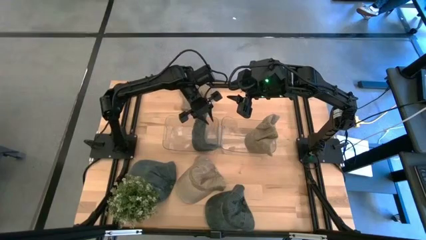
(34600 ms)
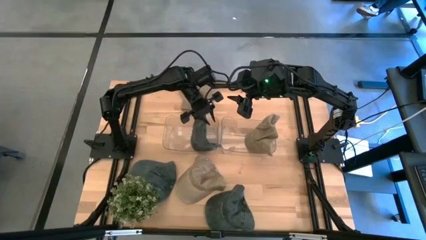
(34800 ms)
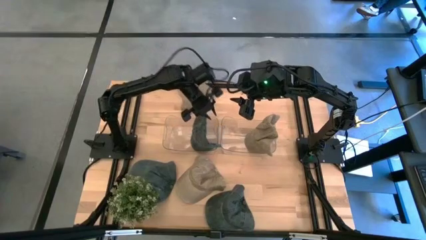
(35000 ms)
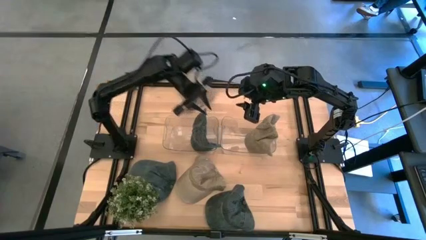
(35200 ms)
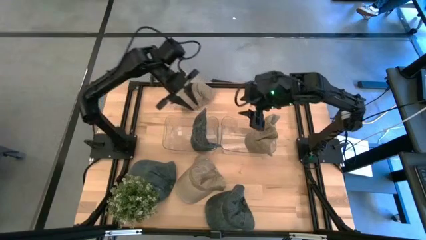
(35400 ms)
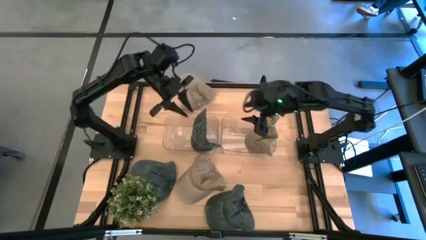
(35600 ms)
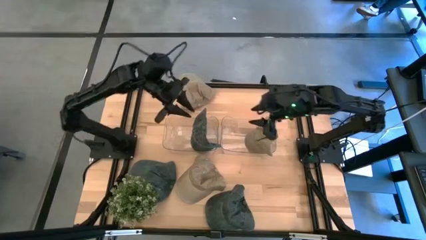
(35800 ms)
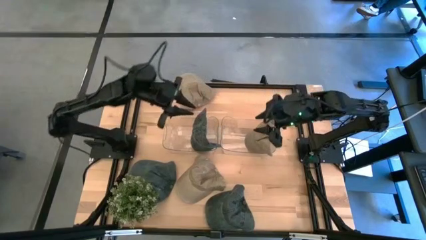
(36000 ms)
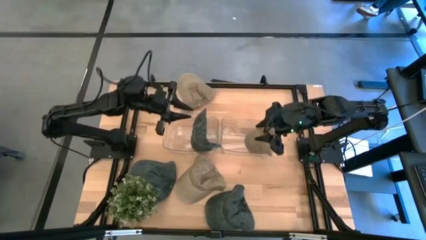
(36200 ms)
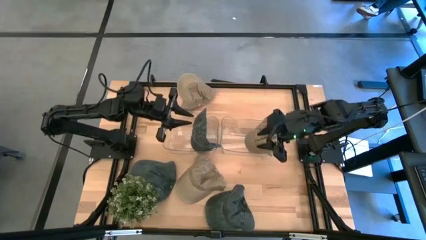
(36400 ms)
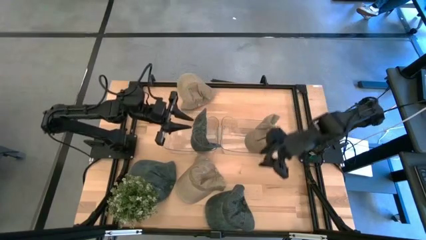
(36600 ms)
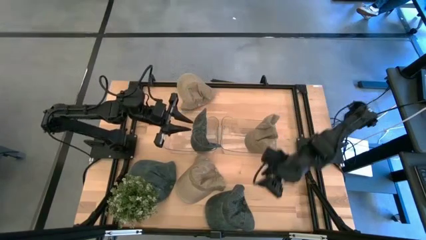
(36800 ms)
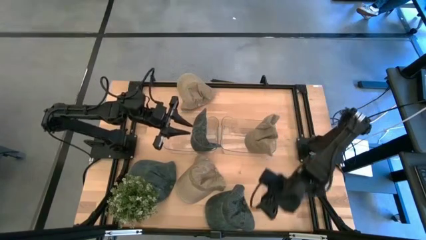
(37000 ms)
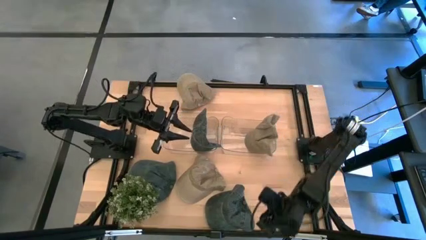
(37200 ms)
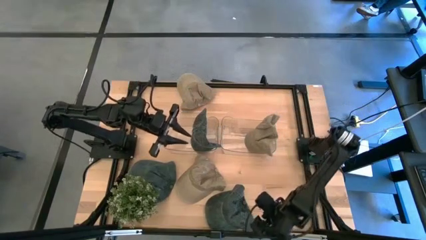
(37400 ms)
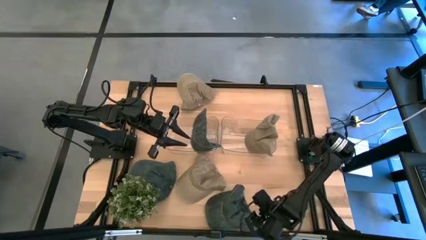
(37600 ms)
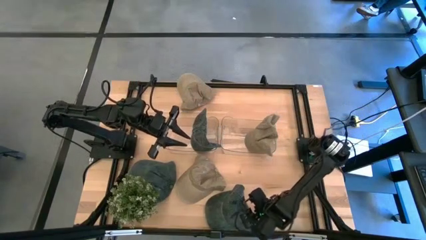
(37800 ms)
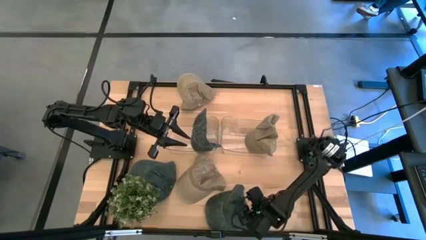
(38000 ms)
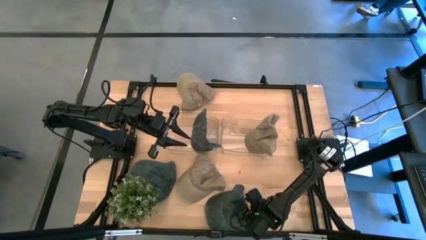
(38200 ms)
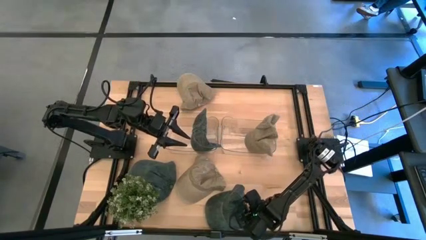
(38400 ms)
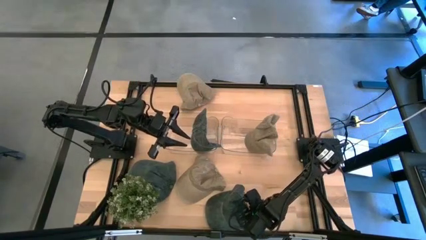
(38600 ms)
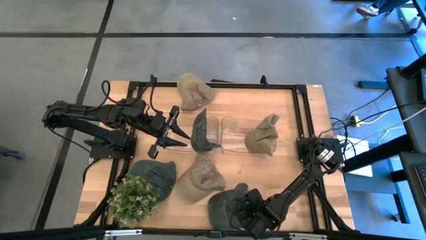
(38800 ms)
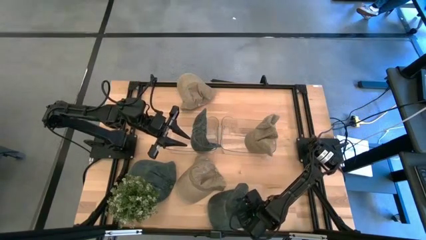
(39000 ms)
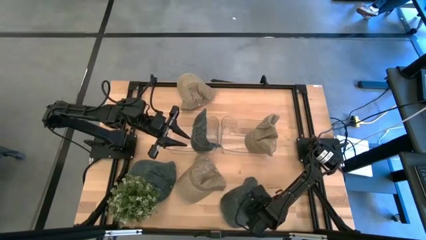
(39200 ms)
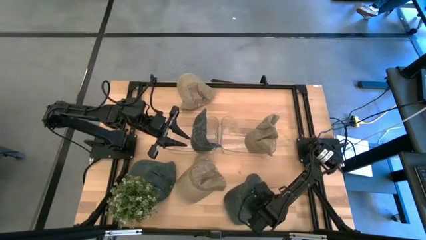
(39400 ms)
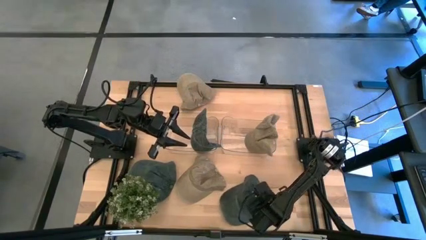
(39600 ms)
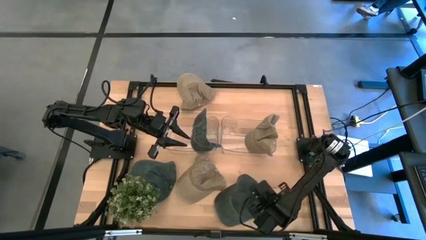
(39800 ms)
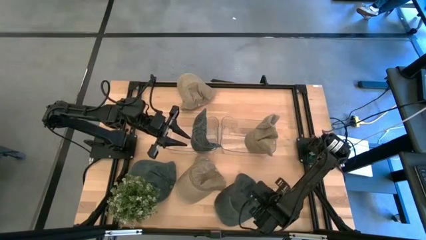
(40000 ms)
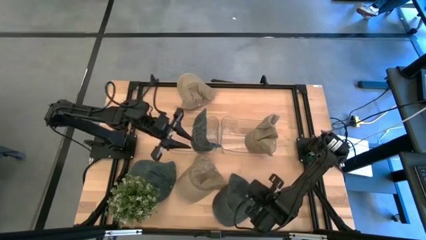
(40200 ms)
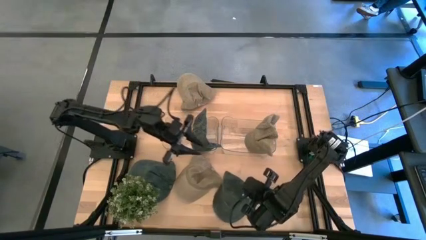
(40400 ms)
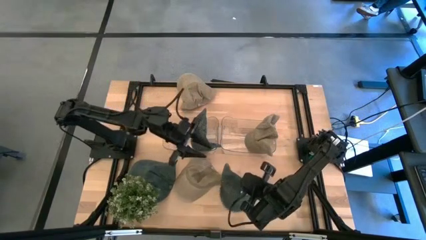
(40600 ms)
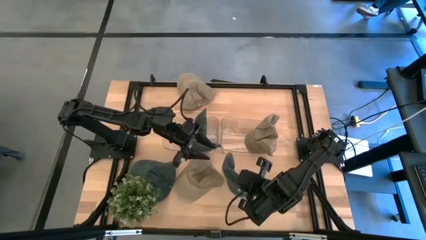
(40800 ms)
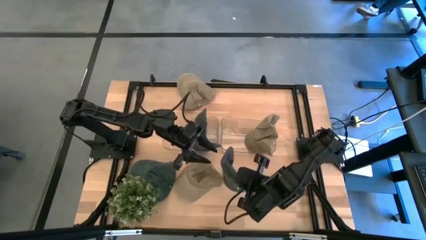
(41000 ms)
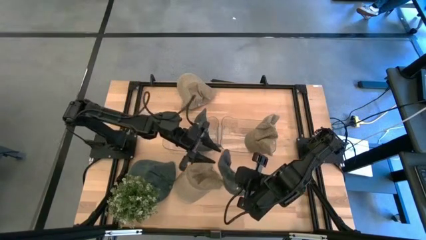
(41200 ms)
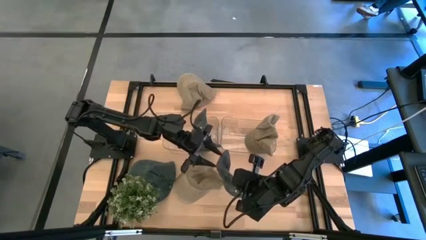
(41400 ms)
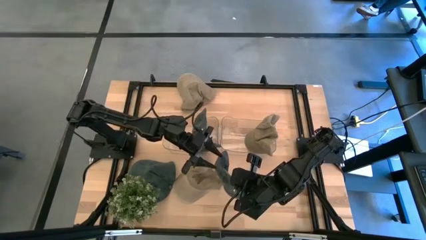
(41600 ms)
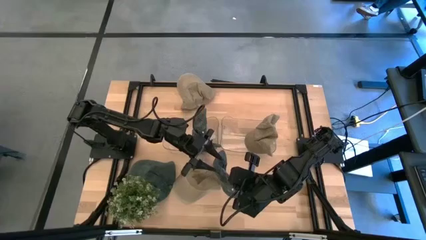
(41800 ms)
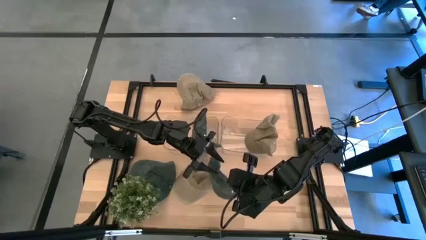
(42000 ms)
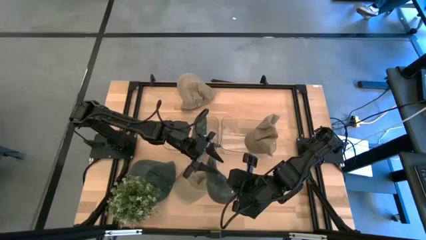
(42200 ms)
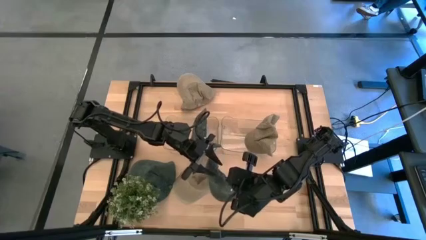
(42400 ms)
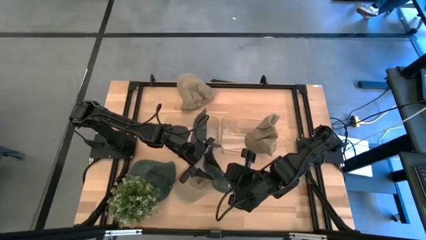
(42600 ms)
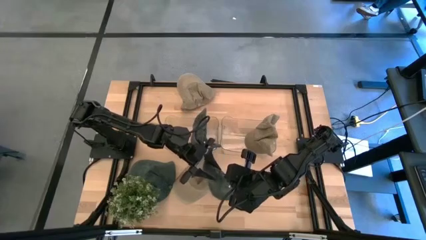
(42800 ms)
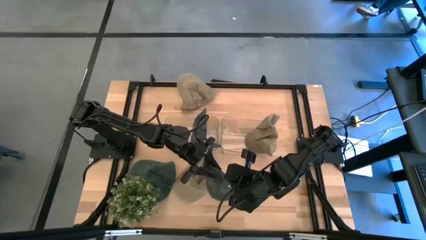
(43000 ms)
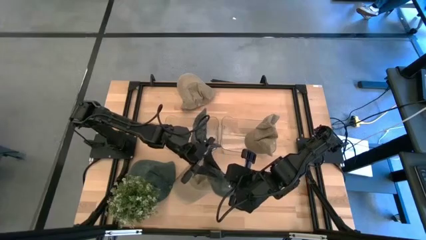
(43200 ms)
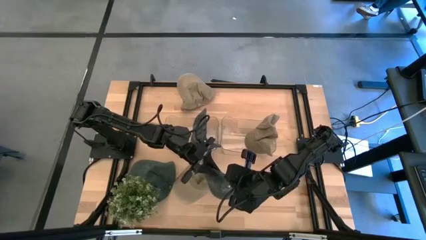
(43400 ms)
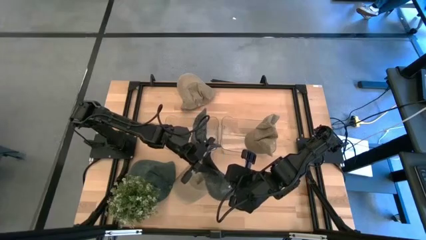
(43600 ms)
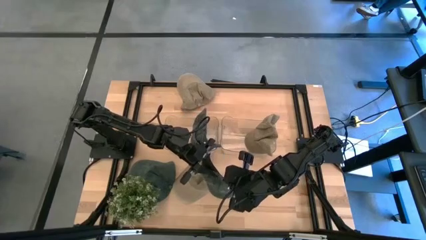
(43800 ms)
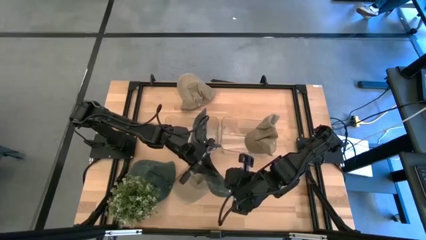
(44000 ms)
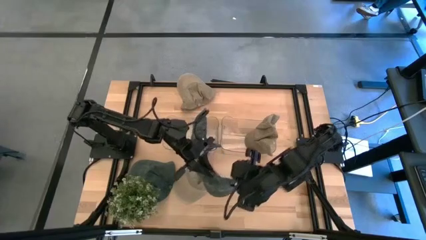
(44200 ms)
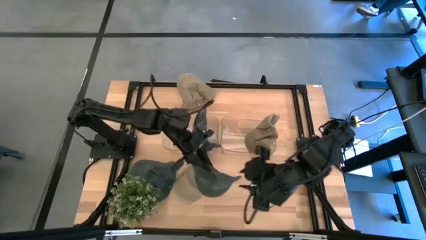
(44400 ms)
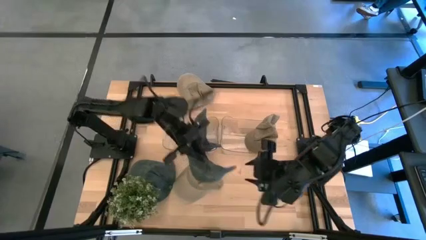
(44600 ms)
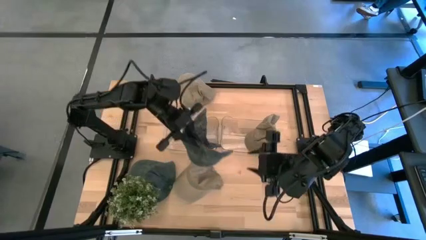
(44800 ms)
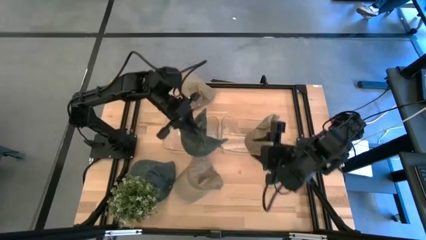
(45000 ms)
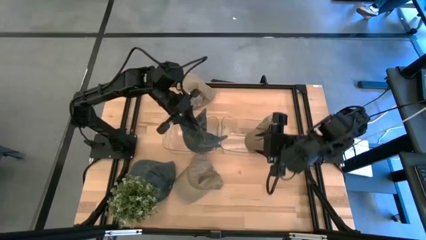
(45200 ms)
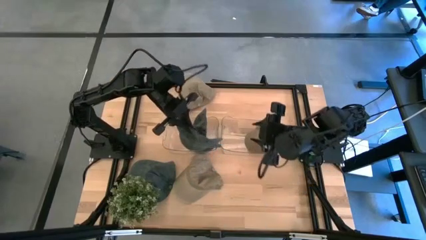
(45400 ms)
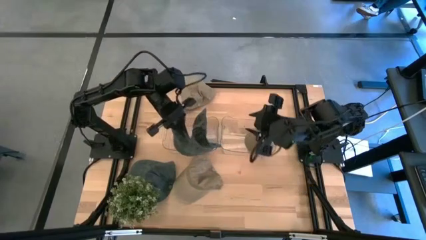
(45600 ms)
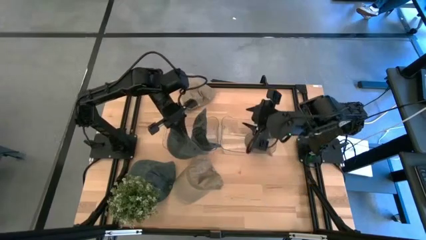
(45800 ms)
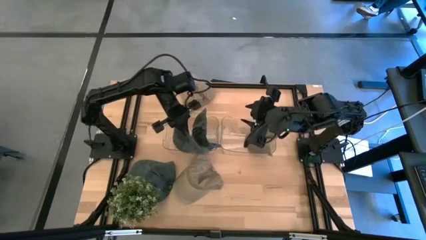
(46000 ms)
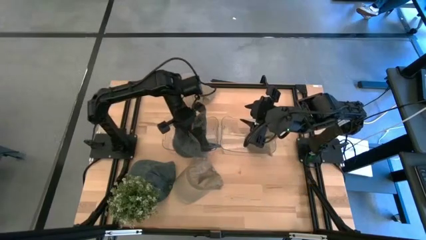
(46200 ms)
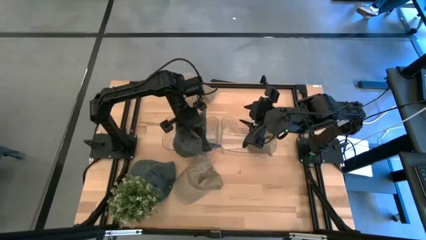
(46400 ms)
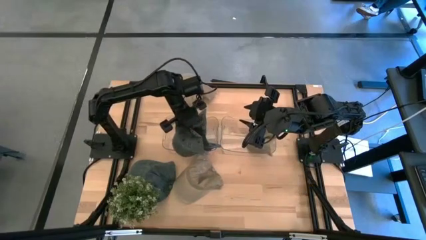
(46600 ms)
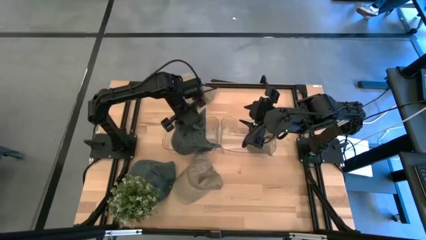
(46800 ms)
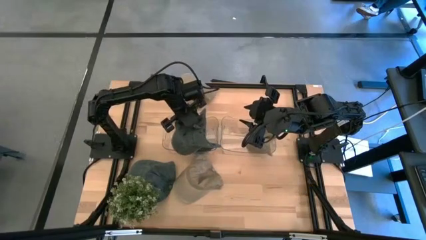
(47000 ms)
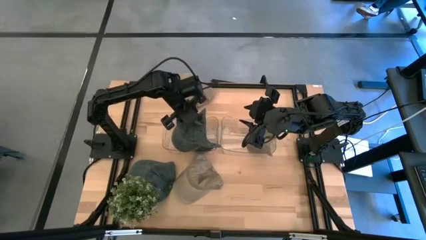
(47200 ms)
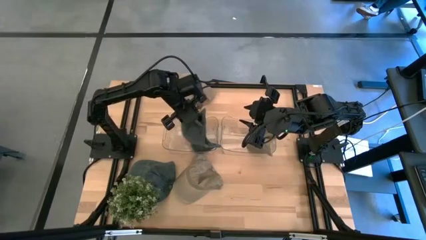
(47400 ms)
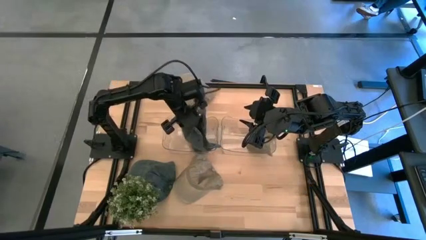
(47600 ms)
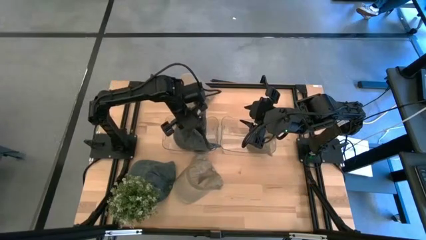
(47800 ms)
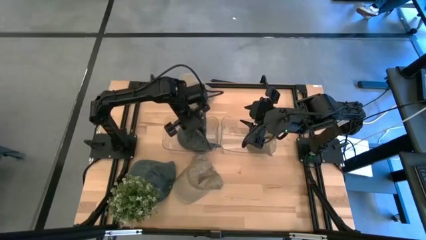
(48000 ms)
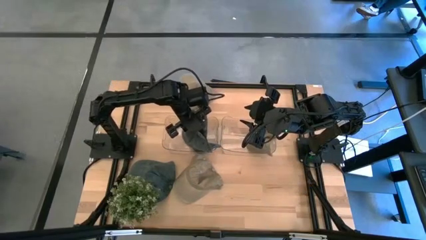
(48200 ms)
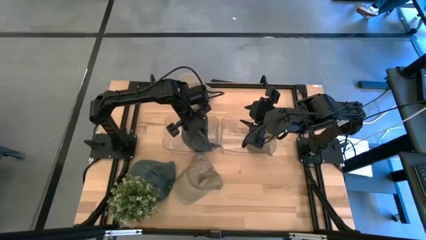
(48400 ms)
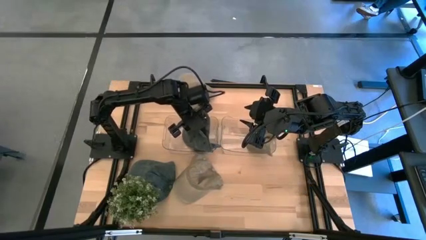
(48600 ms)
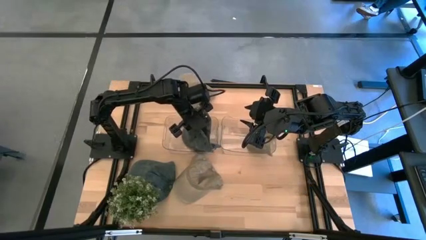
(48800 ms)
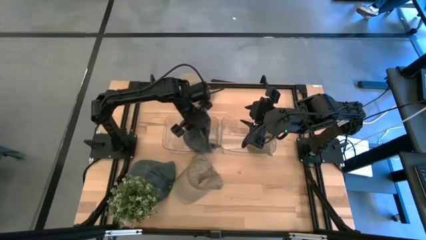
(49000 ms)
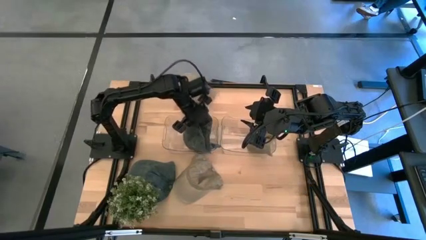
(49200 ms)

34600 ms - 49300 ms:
Task: Pick & Place hat
Put the right blue cap into the left transparent bin
